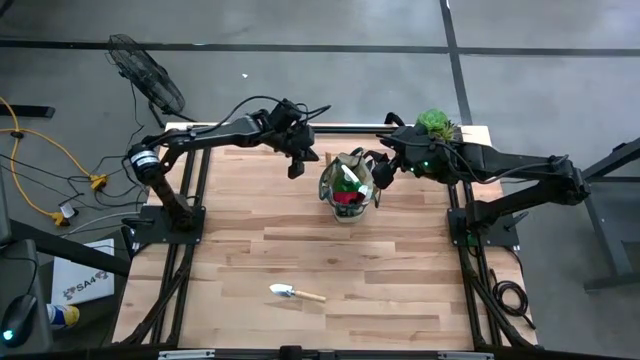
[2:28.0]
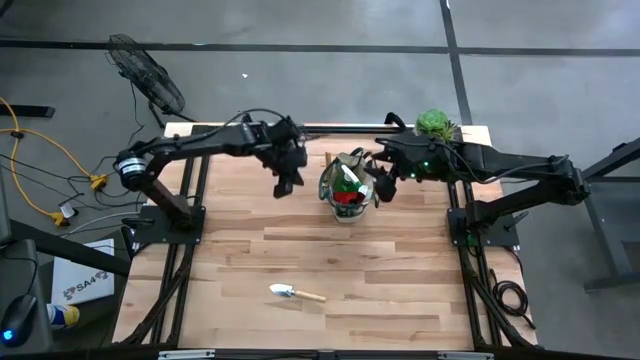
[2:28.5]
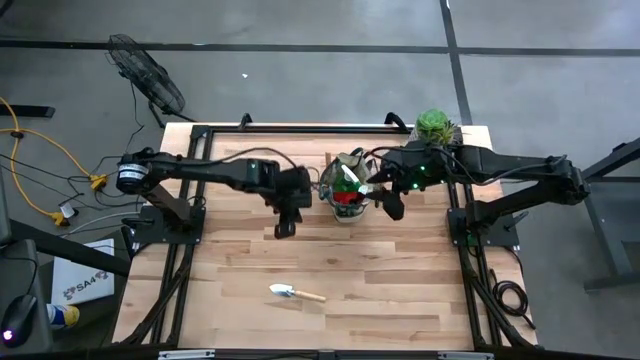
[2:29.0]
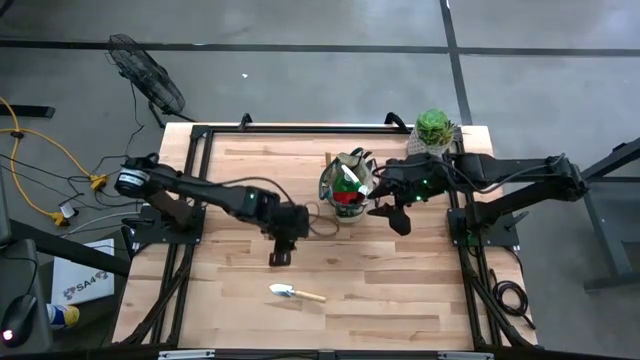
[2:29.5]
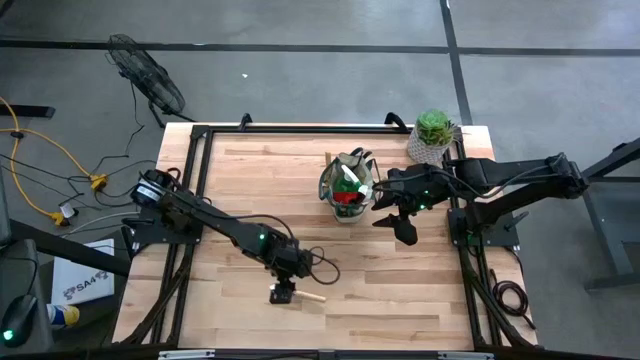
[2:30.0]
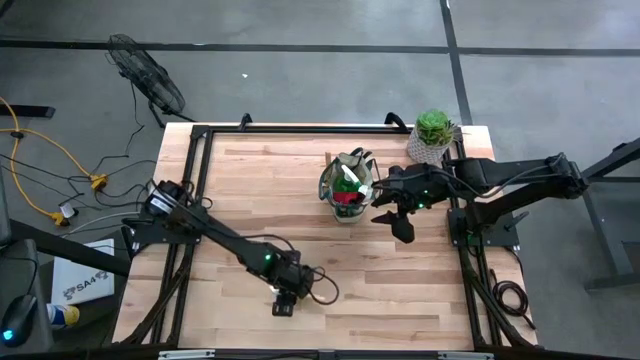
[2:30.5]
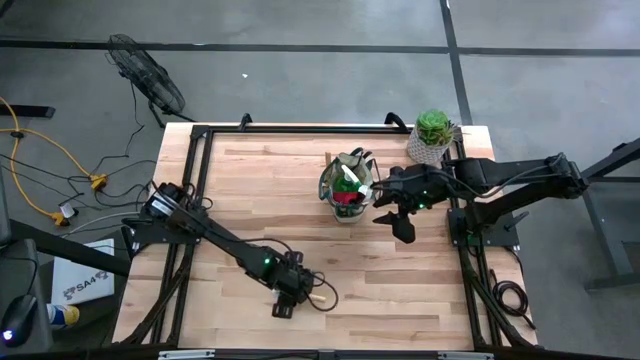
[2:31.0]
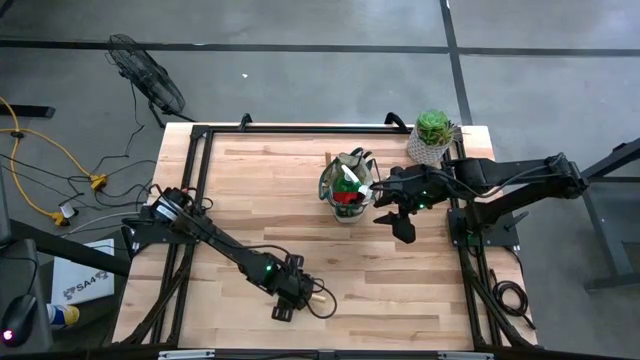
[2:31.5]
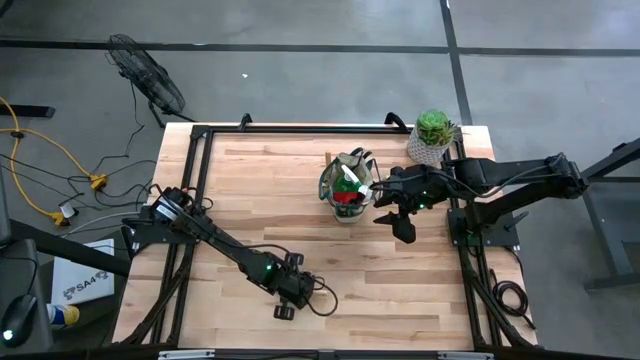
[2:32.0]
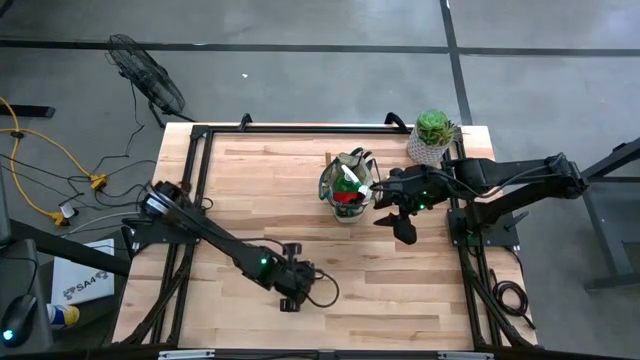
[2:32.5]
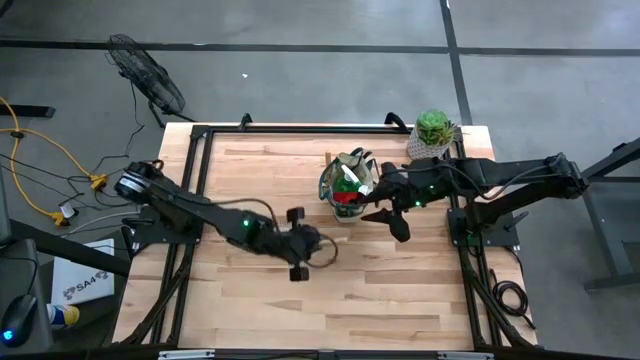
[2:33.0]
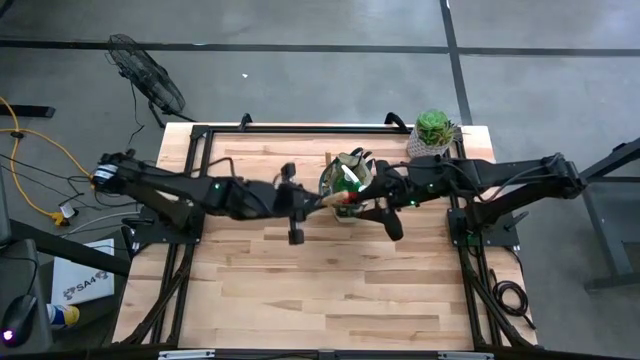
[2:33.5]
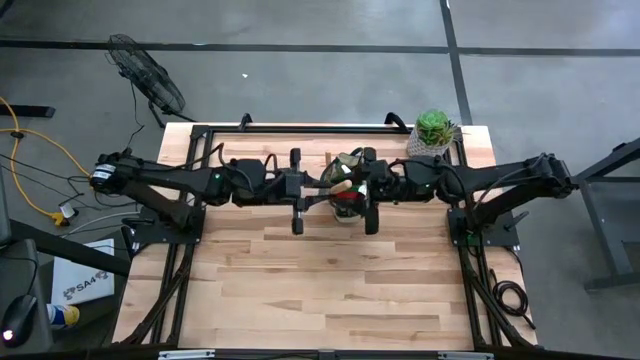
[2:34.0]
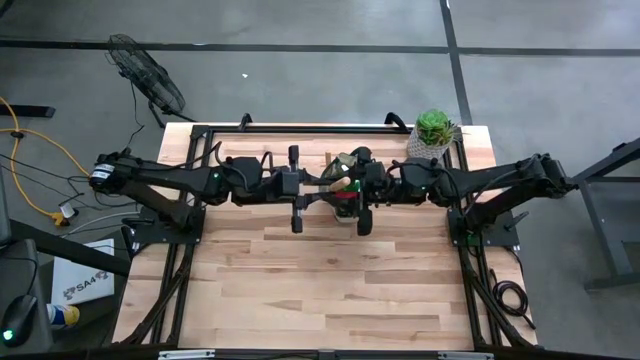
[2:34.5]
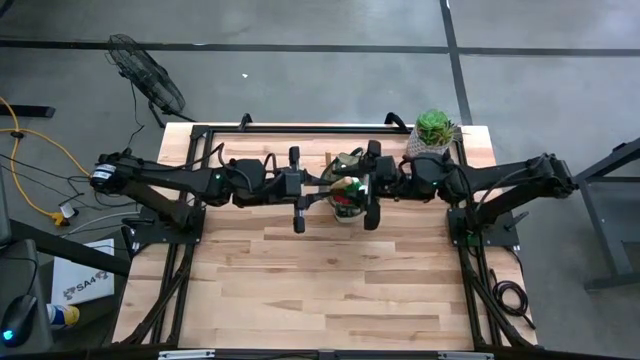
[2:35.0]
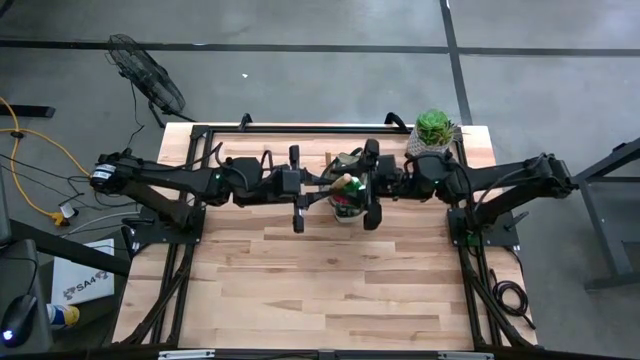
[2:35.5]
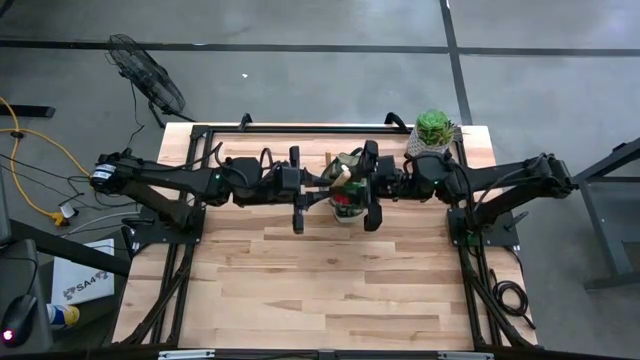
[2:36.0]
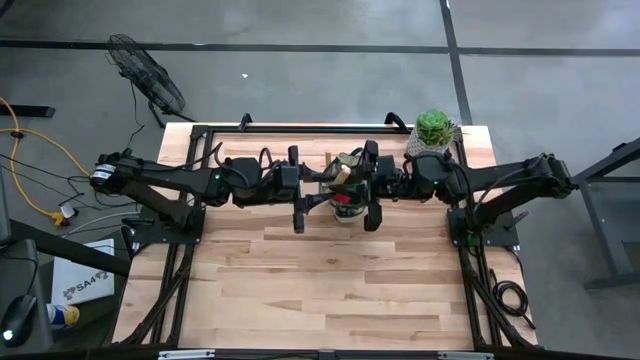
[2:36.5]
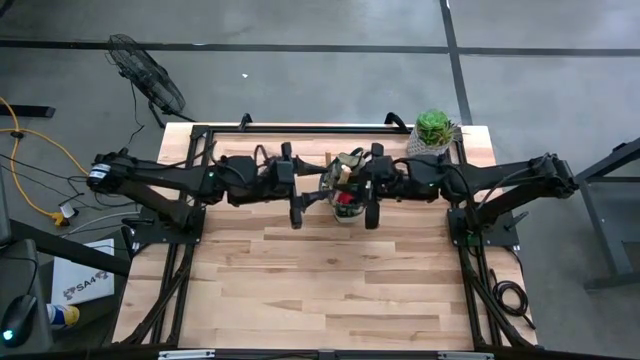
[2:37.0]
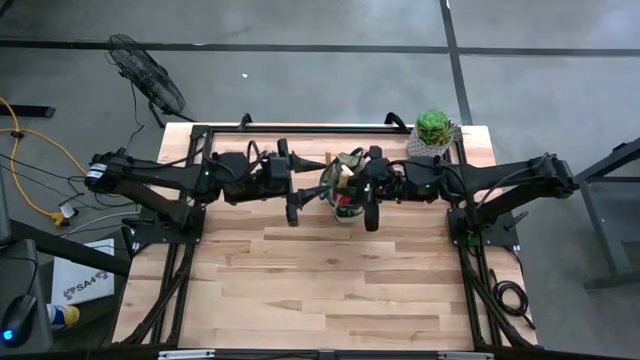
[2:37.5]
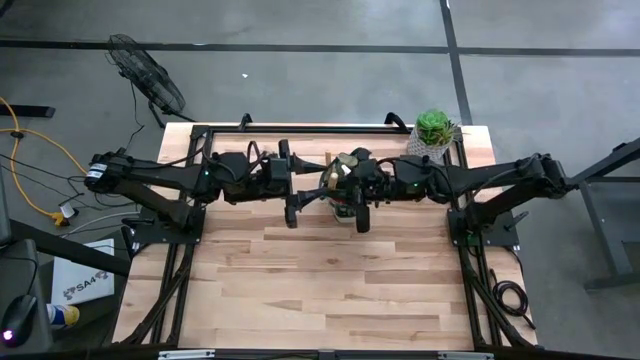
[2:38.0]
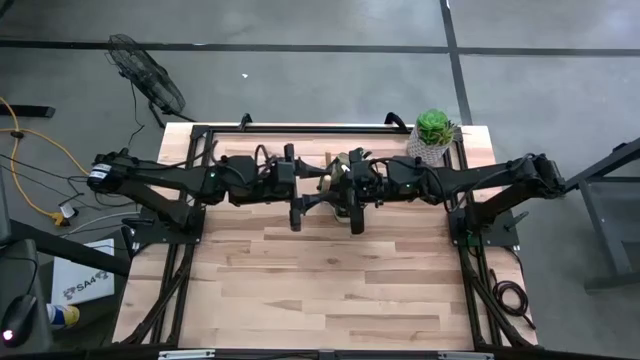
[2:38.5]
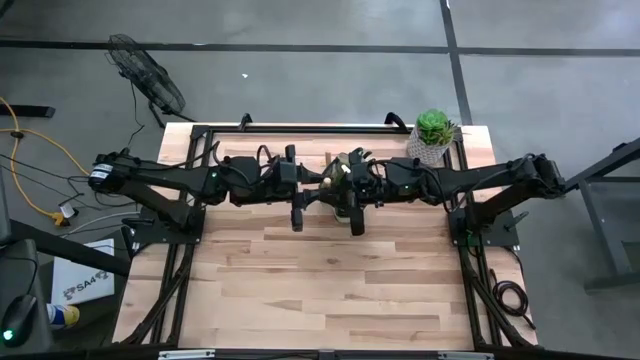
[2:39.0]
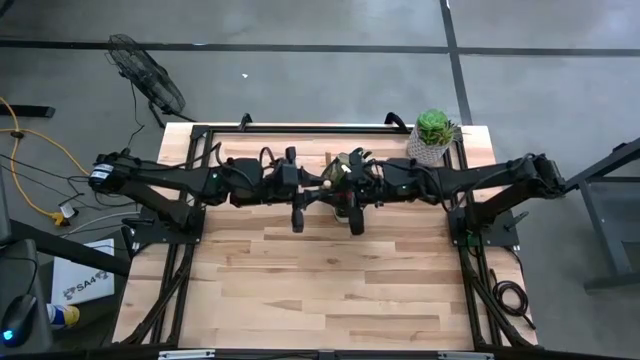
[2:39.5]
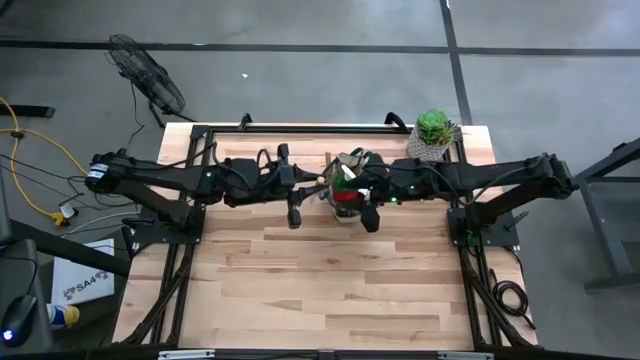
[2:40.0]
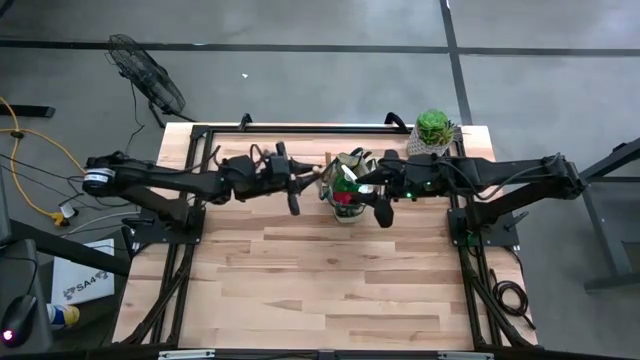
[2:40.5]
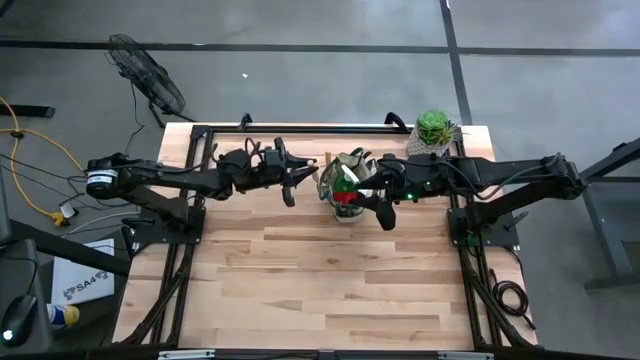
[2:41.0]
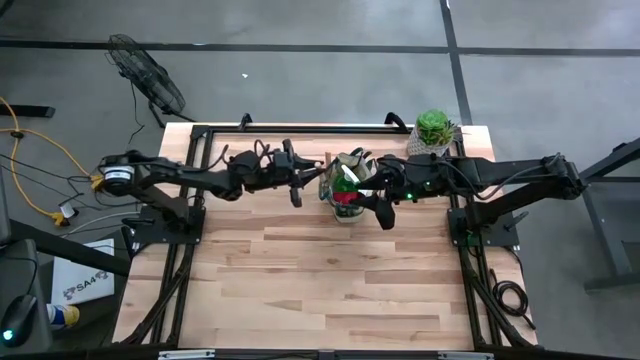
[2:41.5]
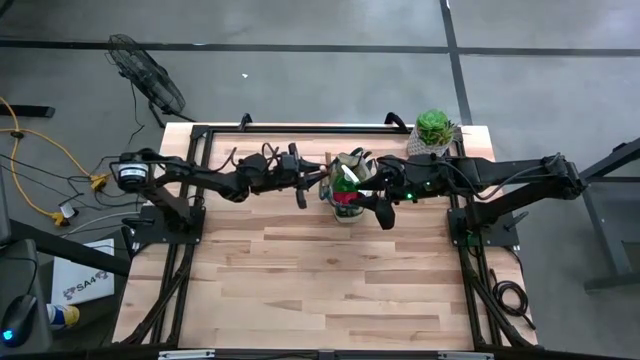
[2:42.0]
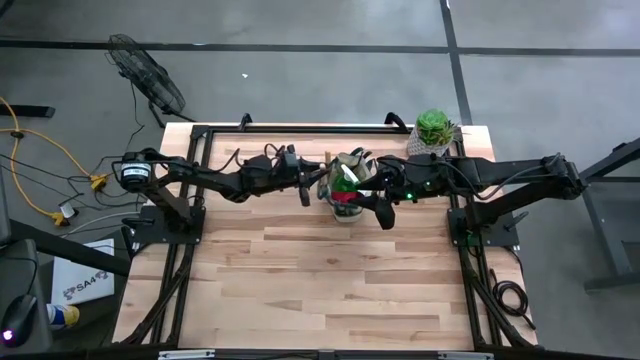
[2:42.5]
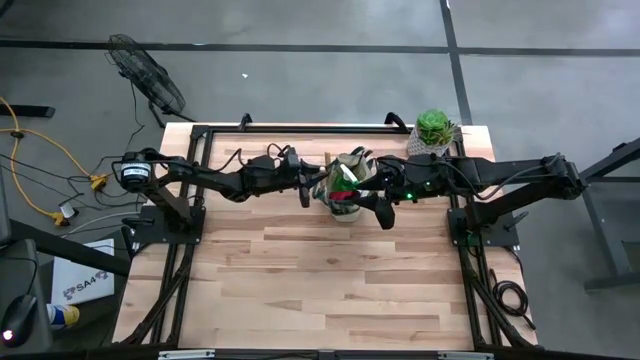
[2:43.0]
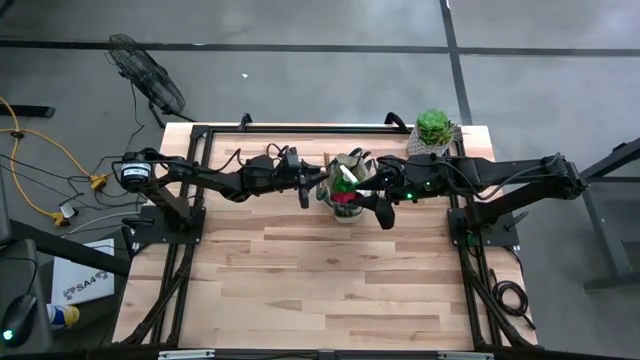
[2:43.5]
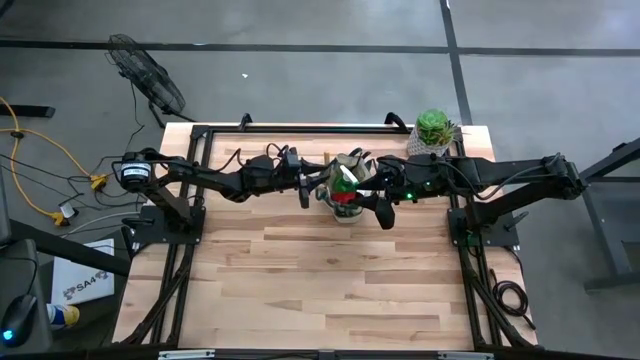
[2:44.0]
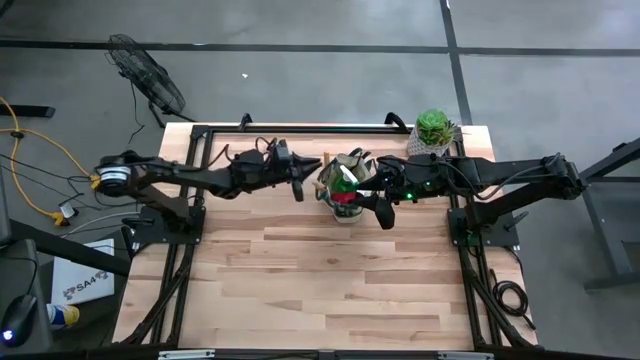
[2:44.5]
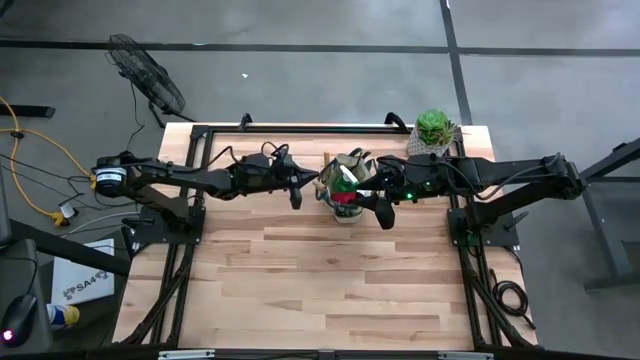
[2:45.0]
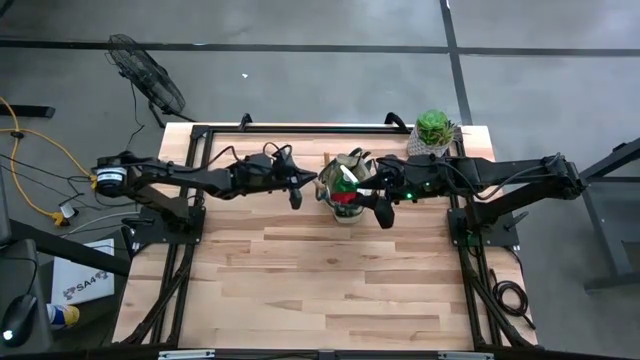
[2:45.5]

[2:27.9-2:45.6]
Task: Pick & Place Garden tools in Gardening bag
Put the brown trowel into the gardening bag

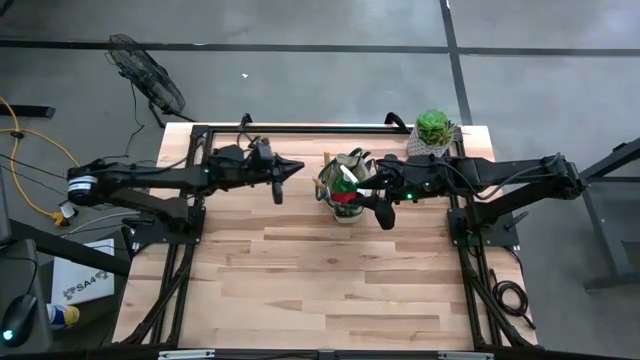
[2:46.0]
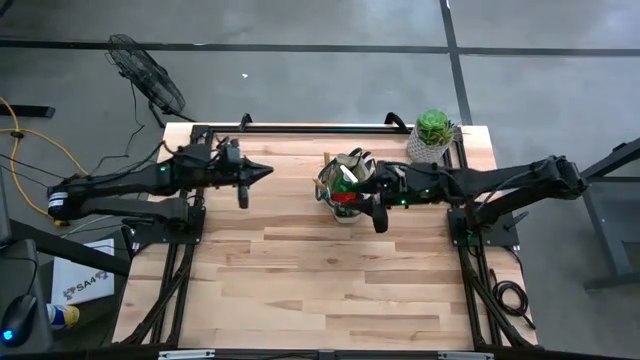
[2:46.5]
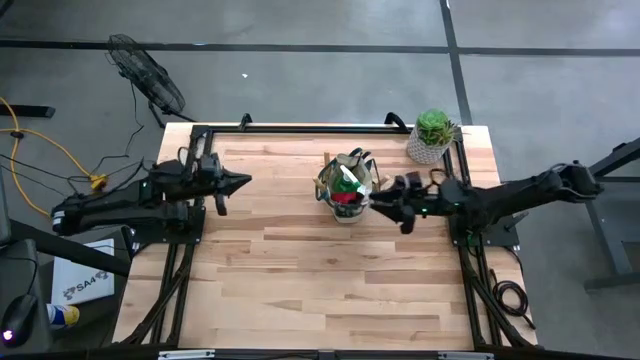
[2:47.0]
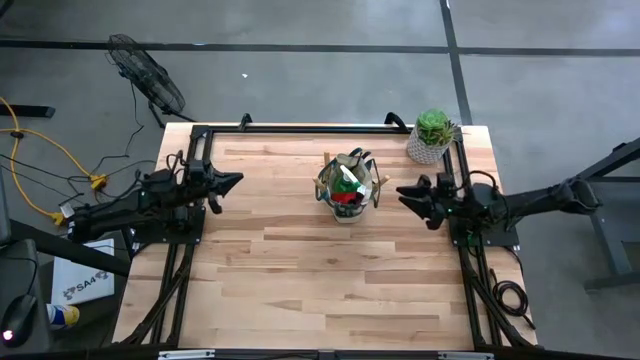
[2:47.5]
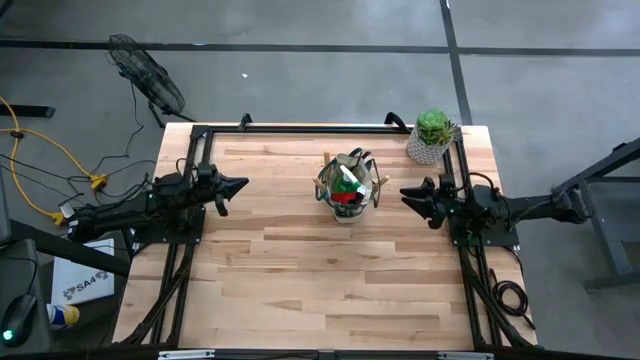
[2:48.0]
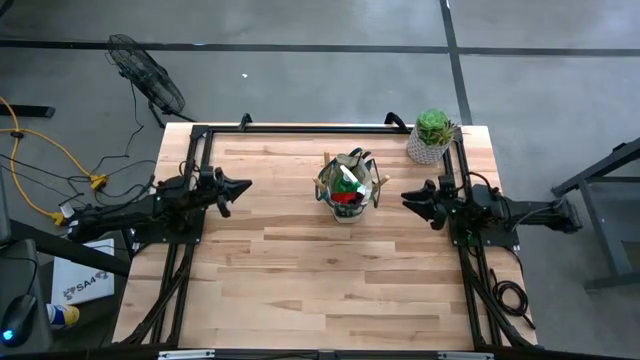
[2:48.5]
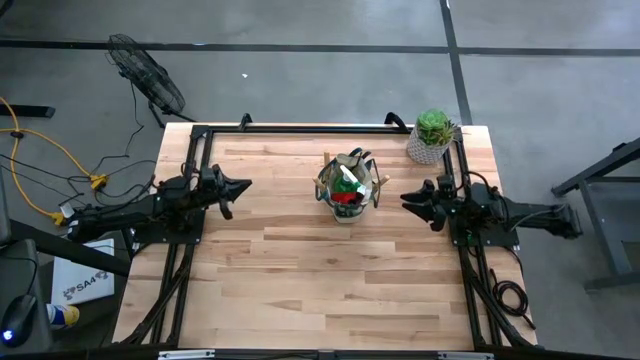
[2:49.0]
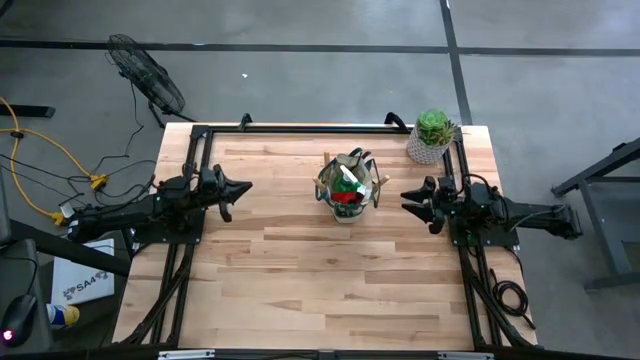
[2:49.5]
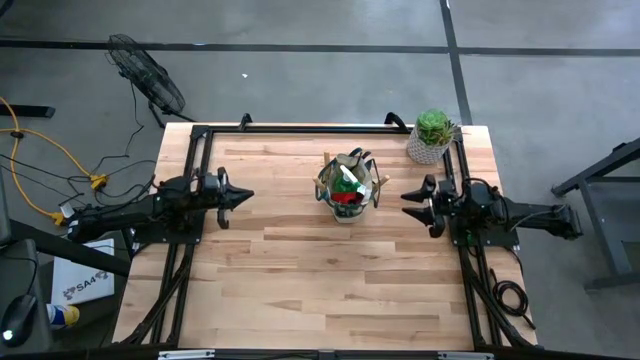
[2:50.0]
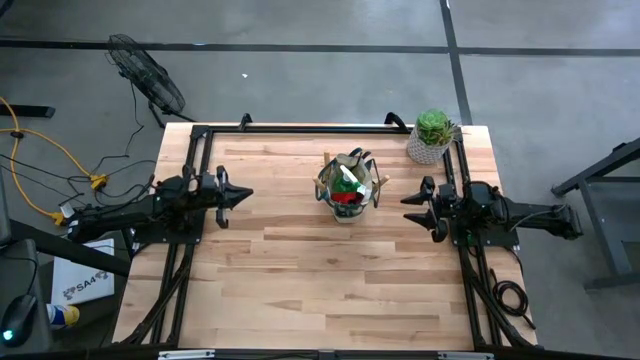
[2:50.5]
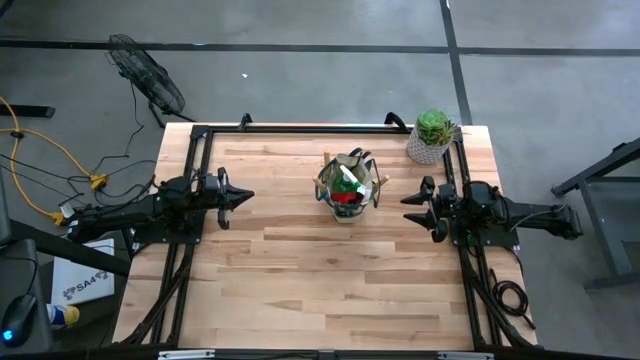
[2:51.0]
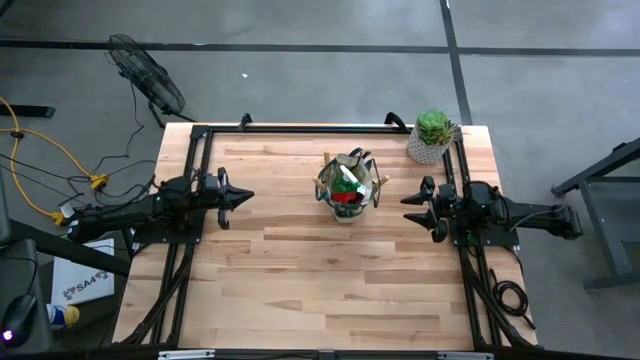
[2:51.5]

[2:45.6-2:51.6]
Return to Home Position
